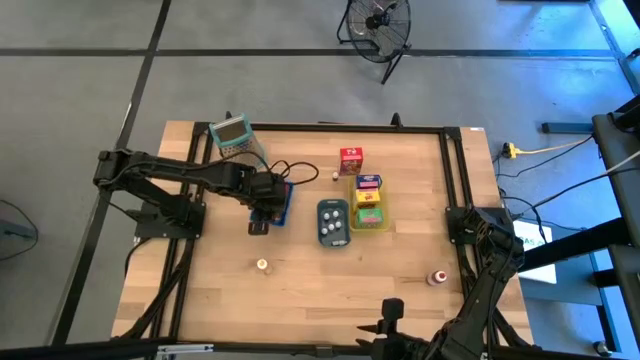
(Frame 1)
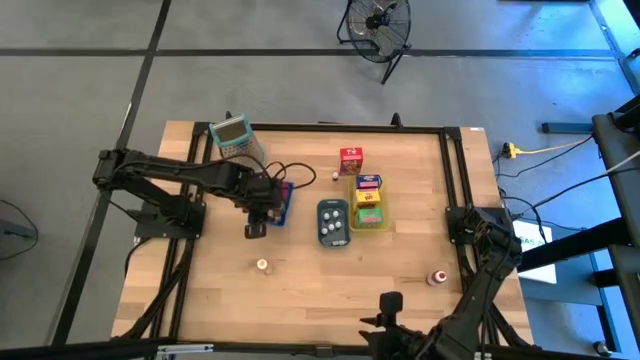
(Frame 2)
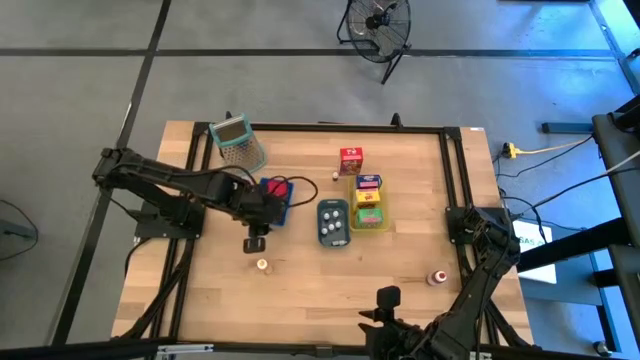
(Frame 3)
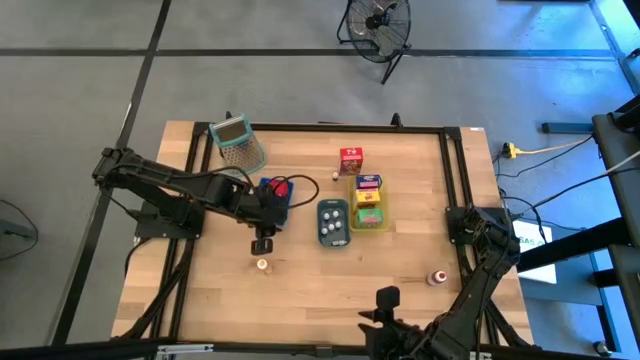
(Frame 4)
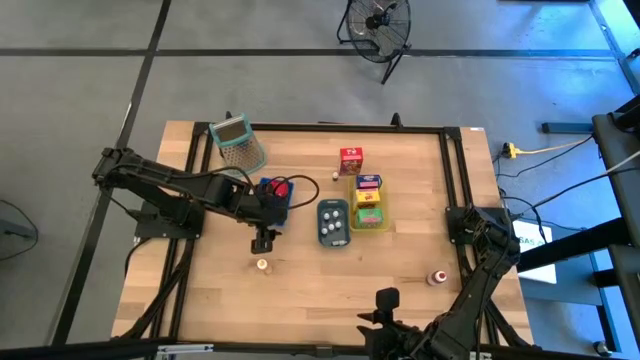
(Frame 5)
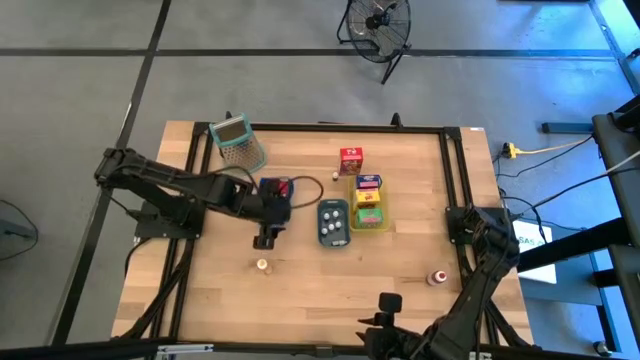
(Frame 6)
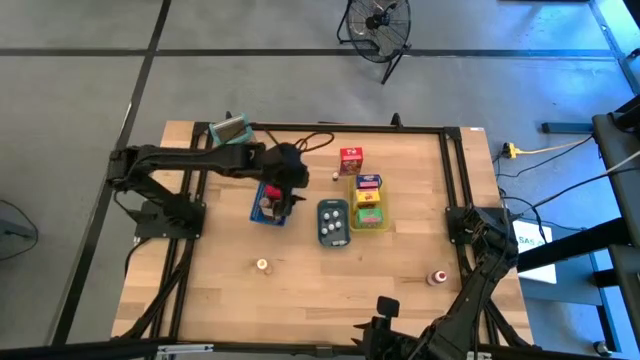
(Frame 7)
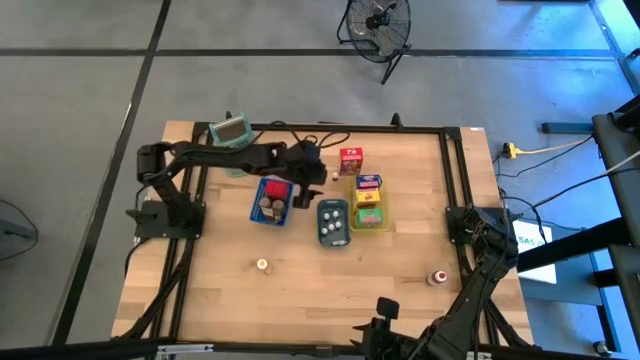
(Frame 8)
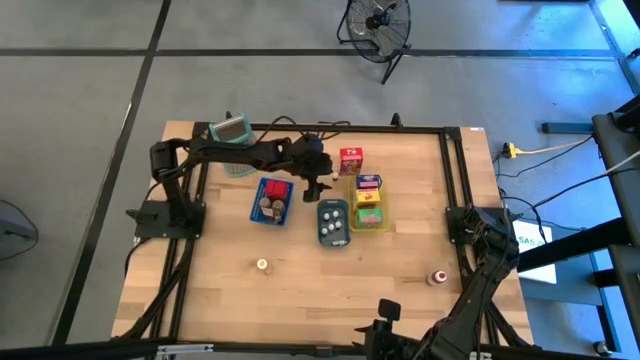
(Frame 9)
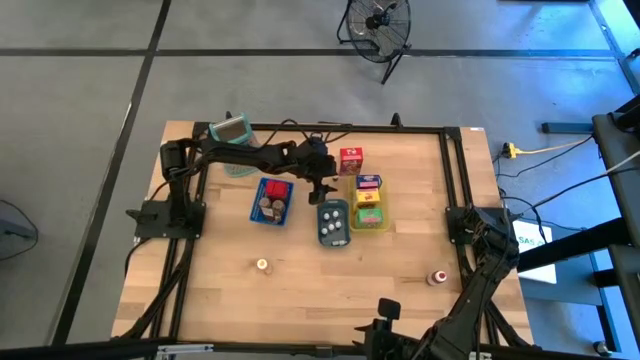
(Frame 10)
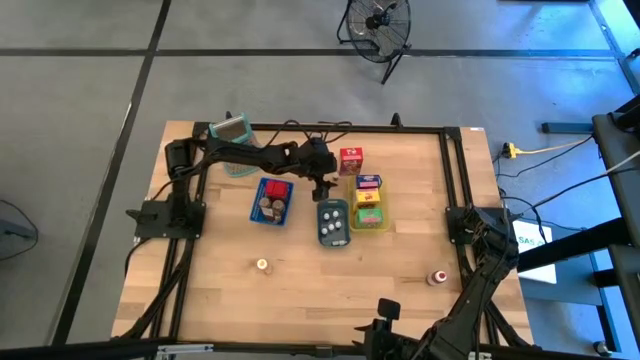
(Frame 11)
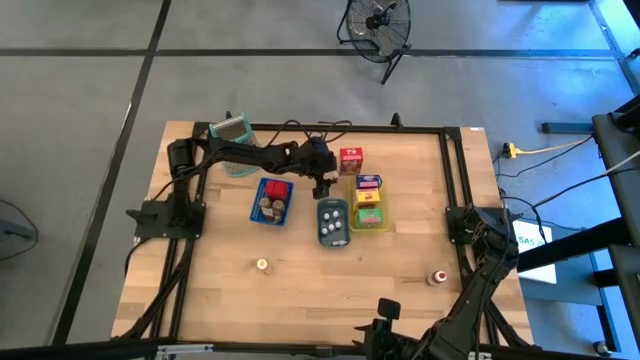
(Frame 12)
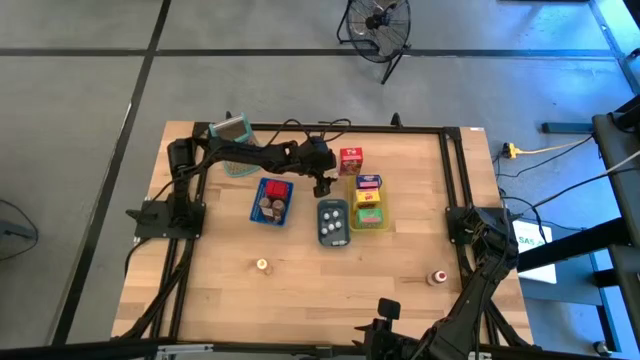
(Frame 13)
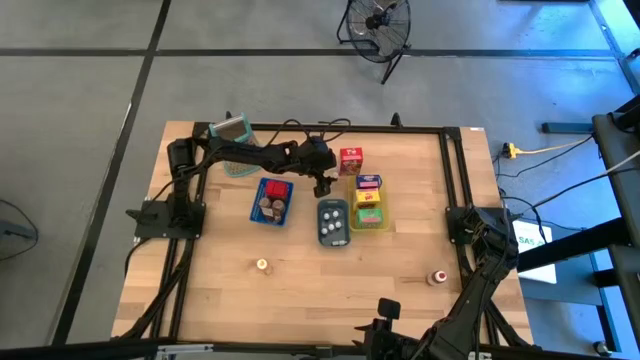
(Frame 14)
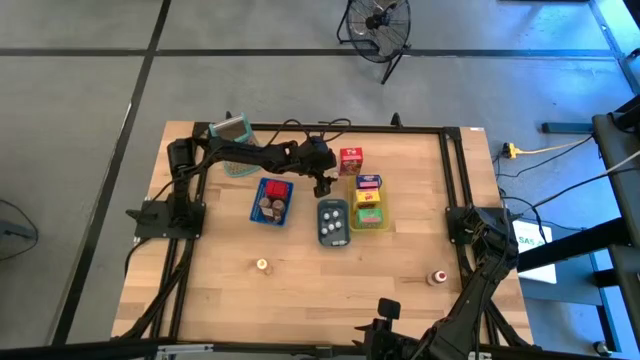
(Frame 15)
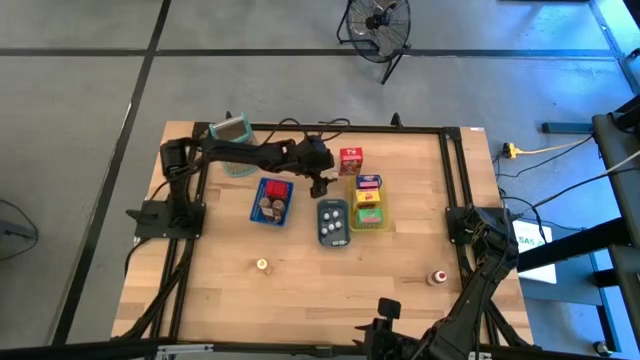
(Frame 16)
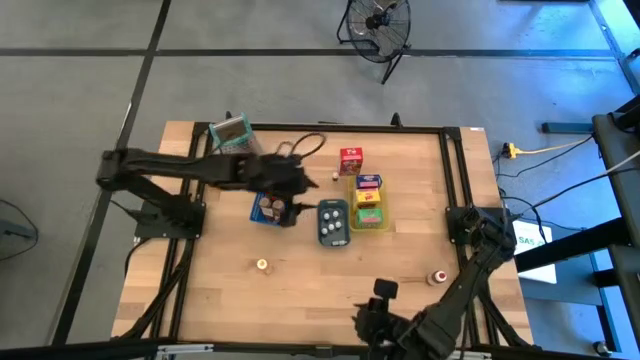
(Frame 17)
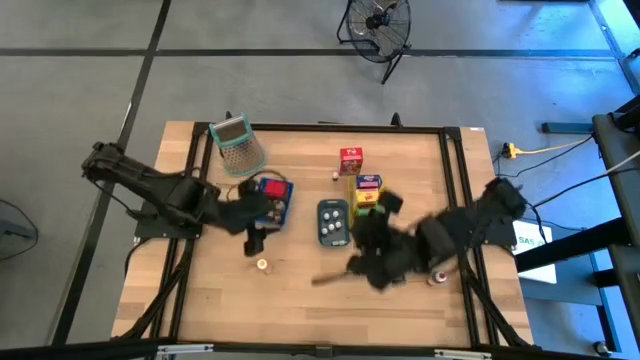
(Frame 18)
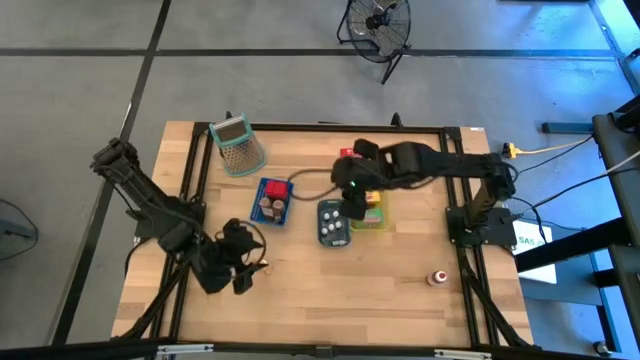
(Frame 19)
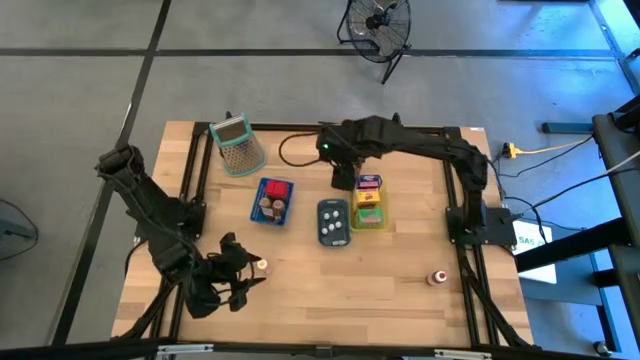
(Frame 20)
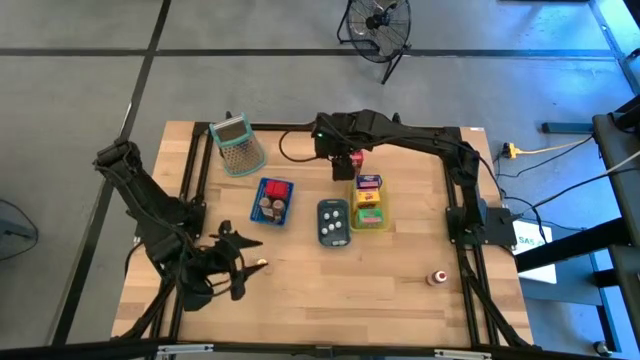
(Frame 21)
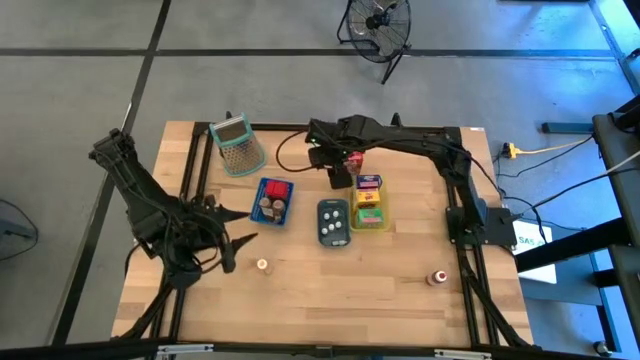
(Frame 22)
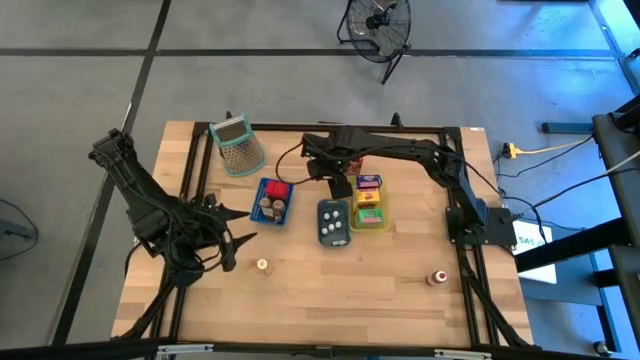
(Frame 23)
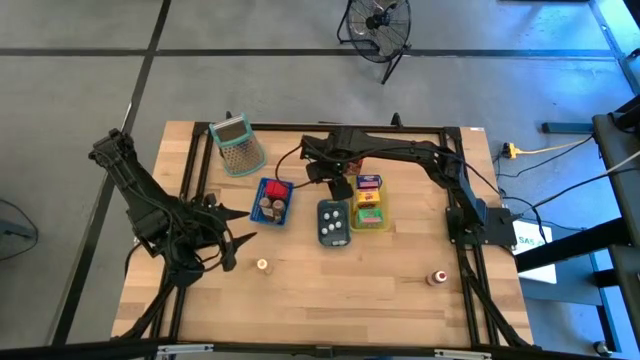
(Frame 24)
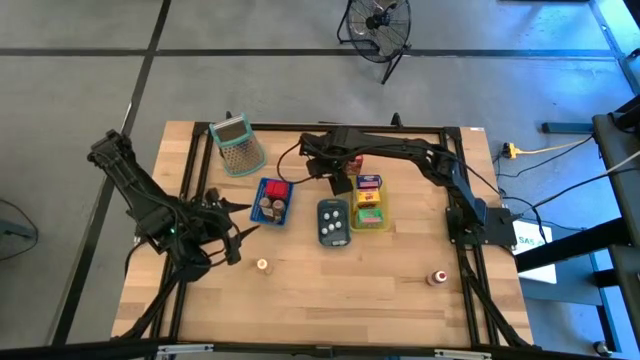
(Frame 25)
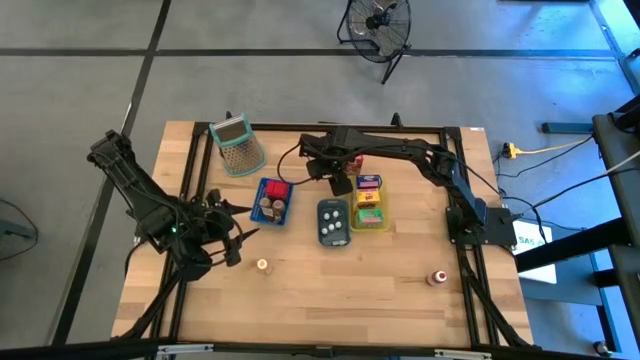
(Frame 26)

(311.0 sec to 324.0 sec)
Task: Pick & Place Kitchen Items
Put the small black food coloring into the green bin

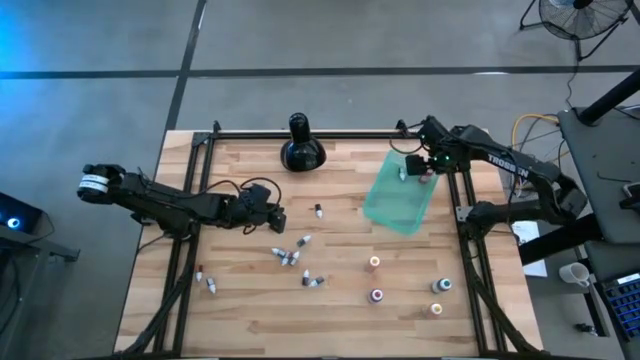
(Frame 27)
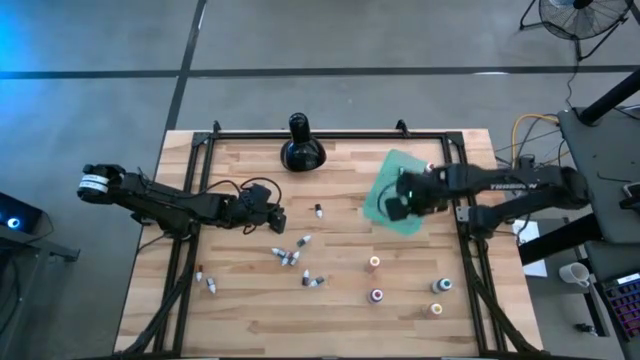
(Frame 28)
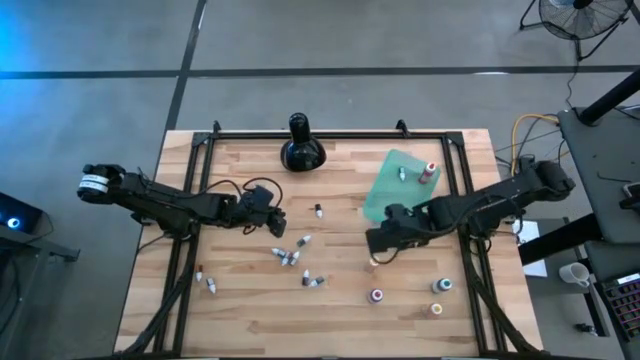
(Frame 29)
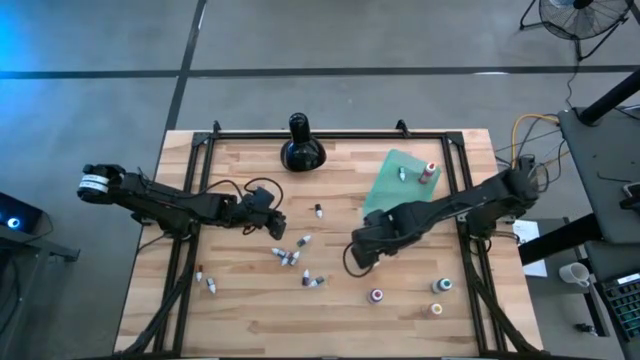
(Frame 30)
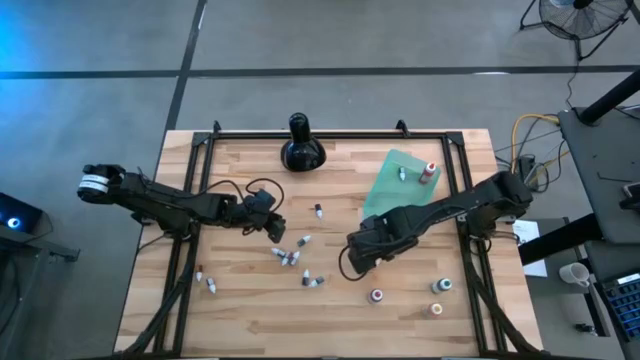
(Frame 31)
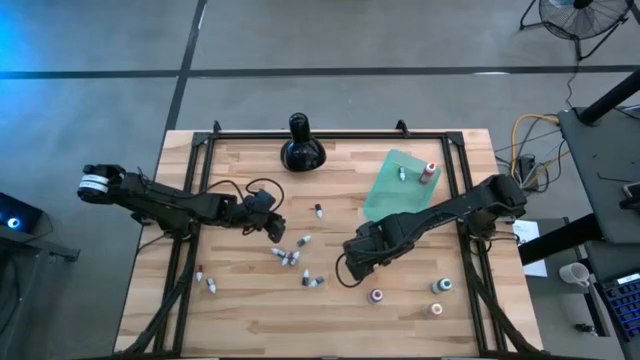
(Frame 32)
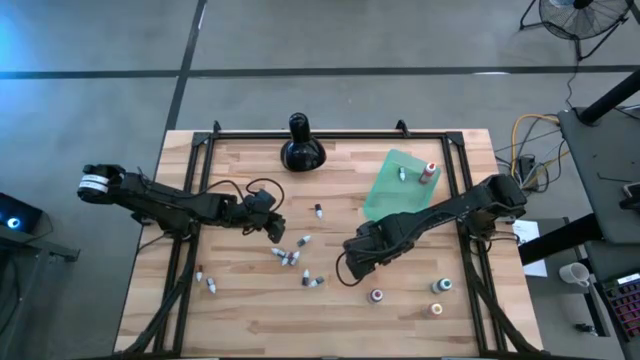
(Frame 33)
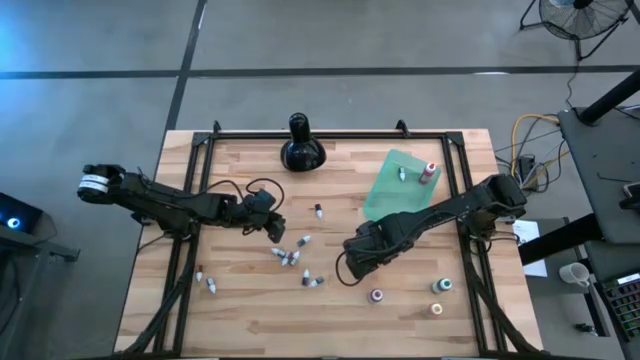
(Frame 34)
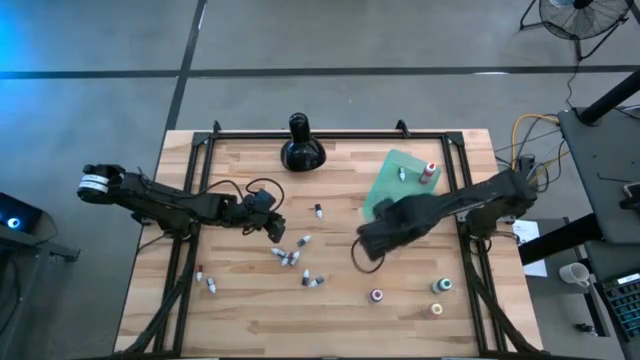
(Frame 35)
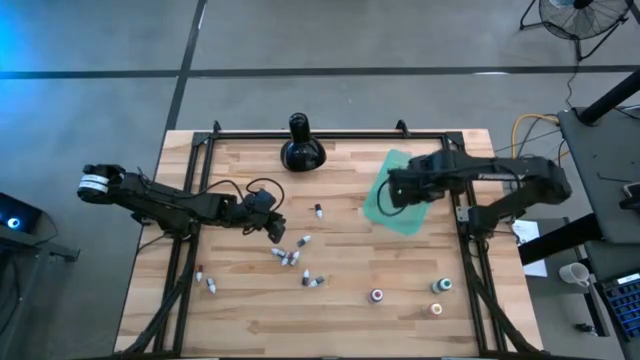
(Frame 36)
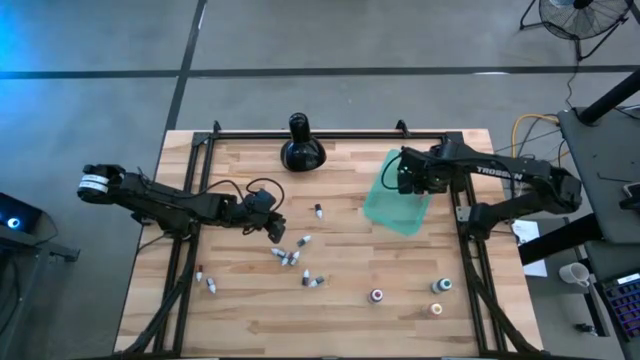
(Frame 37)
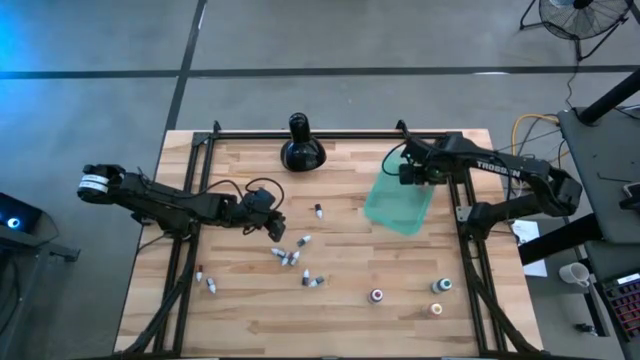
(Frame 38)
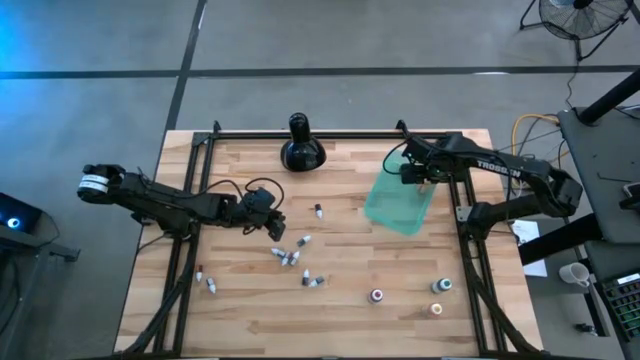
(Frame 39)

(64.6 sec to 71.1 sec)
Task: Pick & Place food coloring
Put the top large yellow food coloring bottle into the green bin

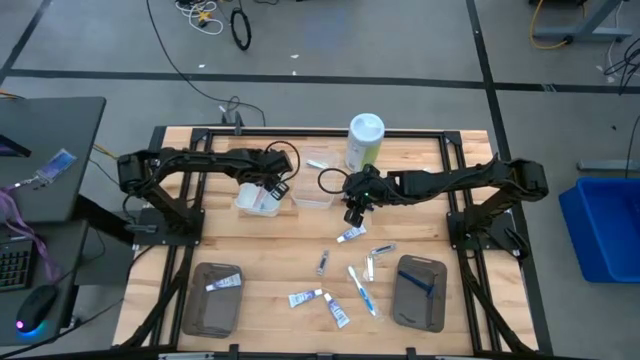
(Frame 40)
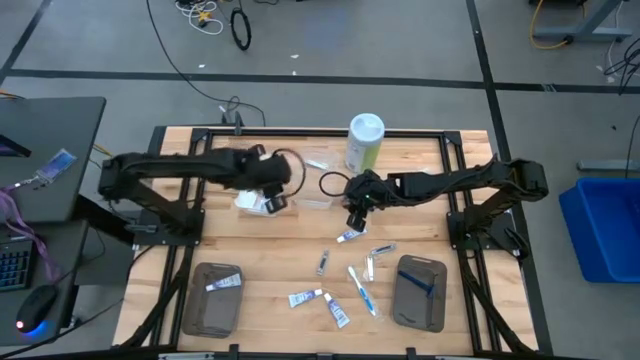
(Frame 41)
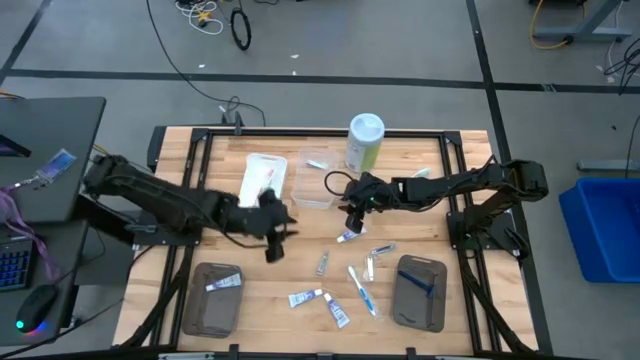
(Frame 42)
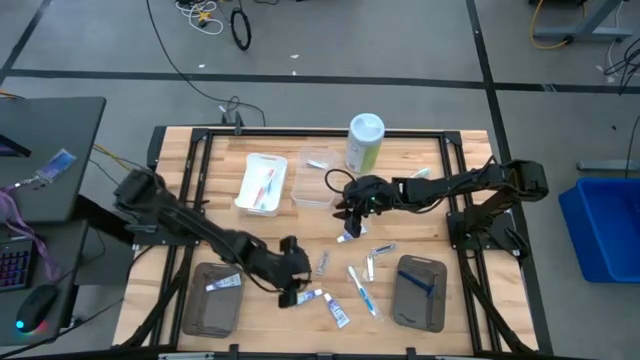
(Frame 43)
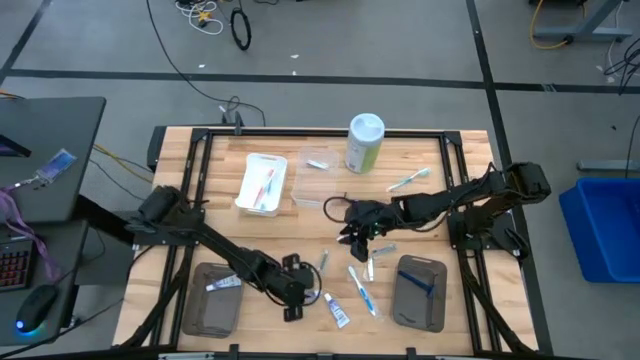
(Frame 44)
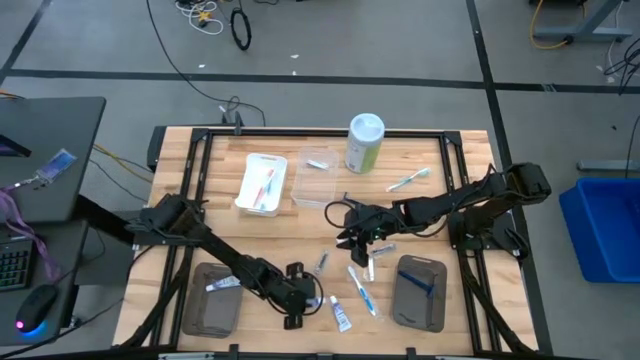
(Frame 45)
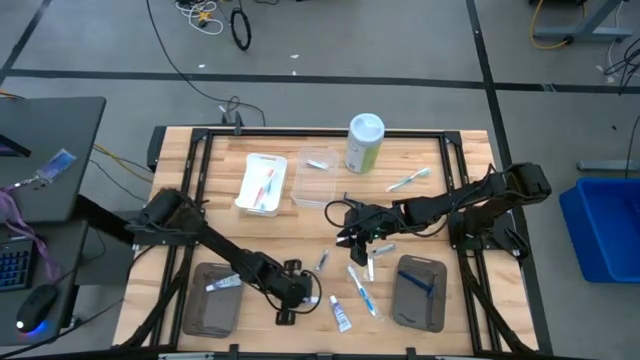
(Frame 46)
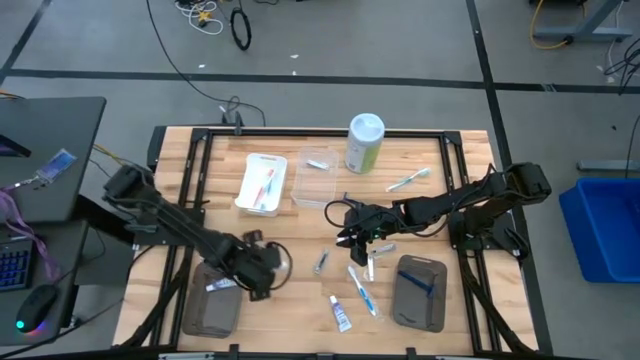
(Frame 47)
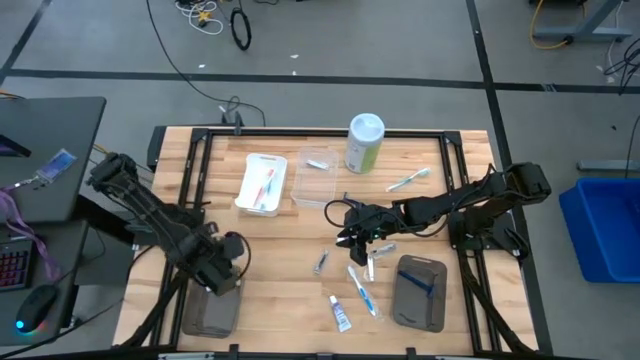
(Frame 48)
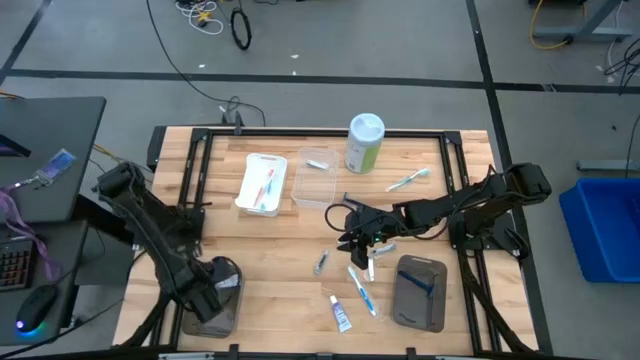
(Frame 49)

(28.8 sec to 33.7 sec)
Task: Pick & Place Travel size toiletries
Put the white toothpaste into the left black bin
